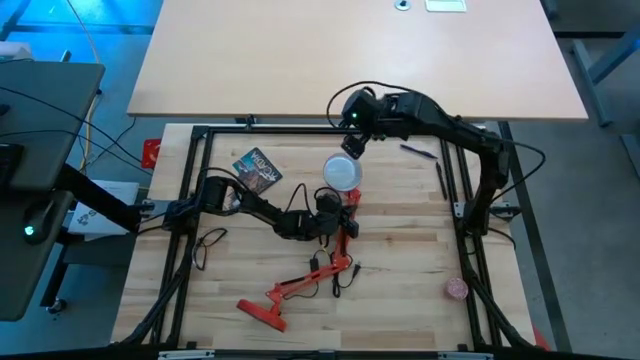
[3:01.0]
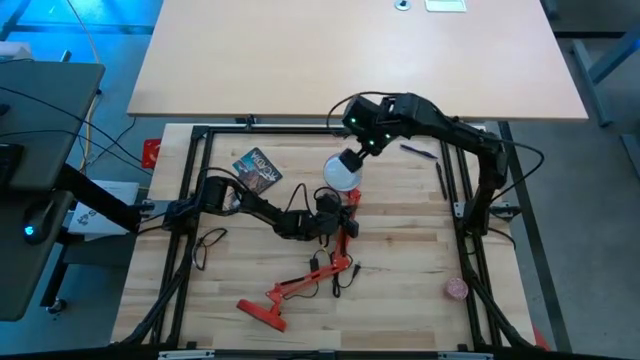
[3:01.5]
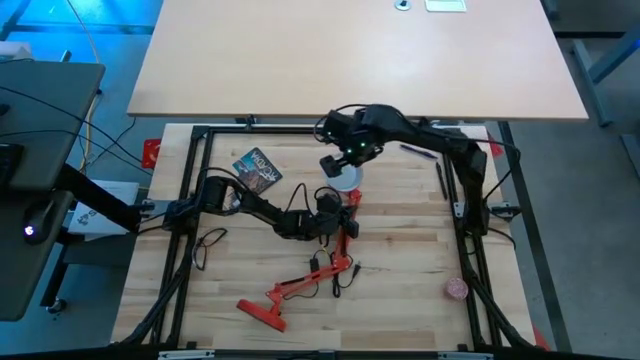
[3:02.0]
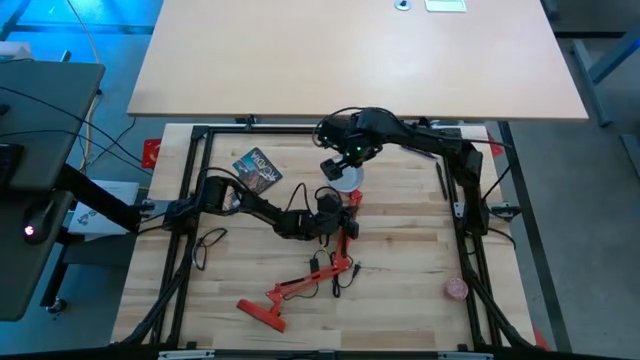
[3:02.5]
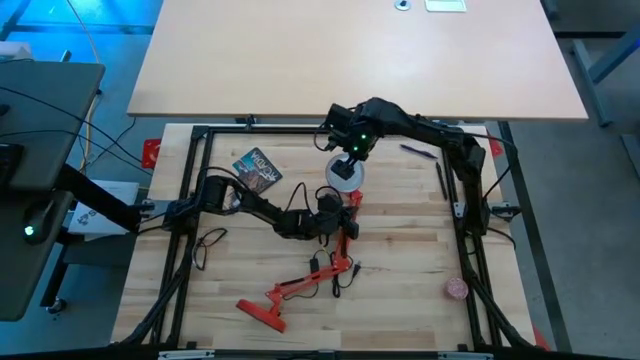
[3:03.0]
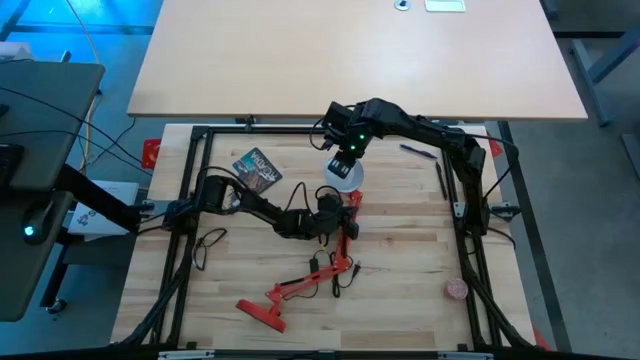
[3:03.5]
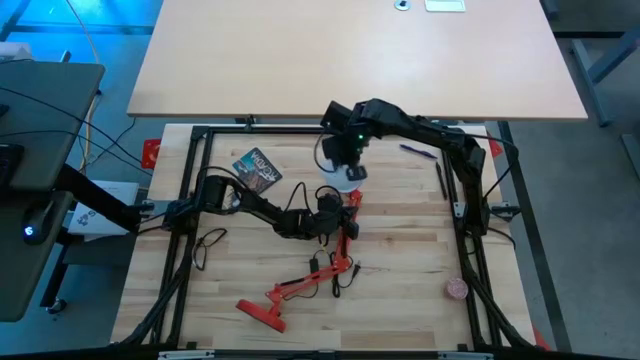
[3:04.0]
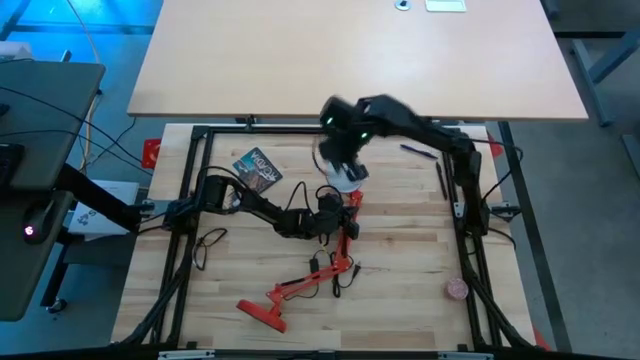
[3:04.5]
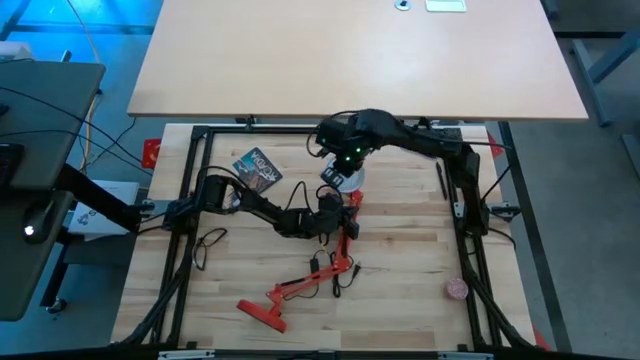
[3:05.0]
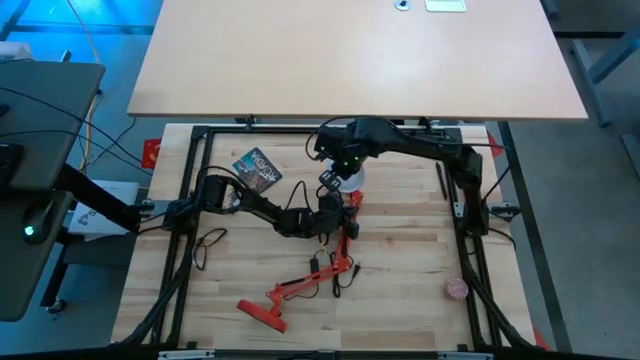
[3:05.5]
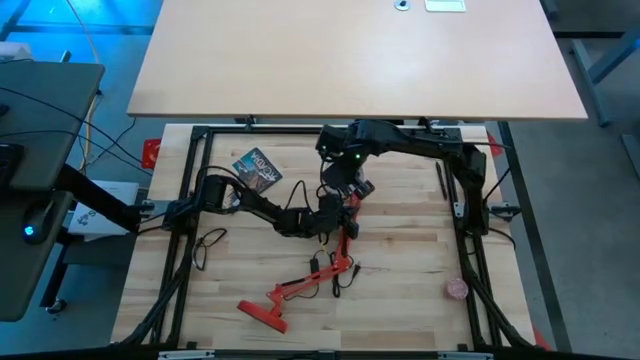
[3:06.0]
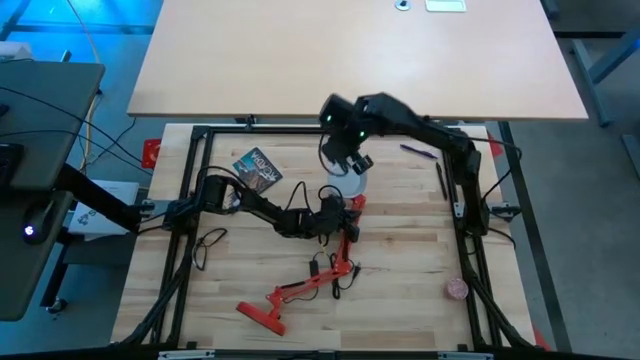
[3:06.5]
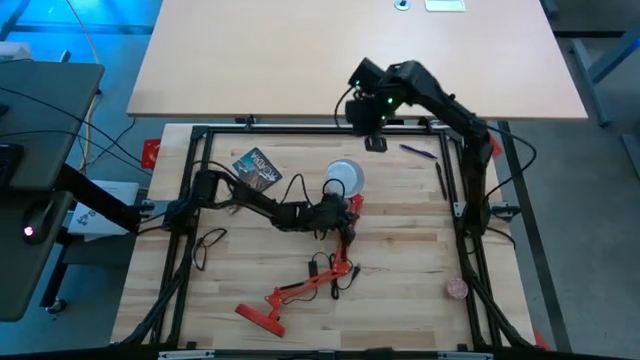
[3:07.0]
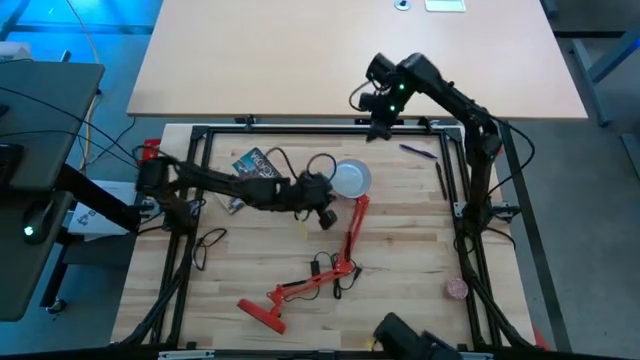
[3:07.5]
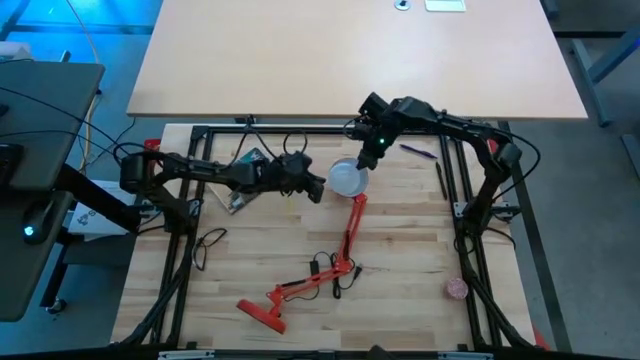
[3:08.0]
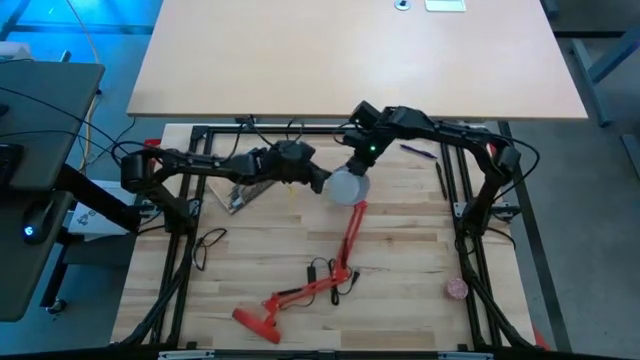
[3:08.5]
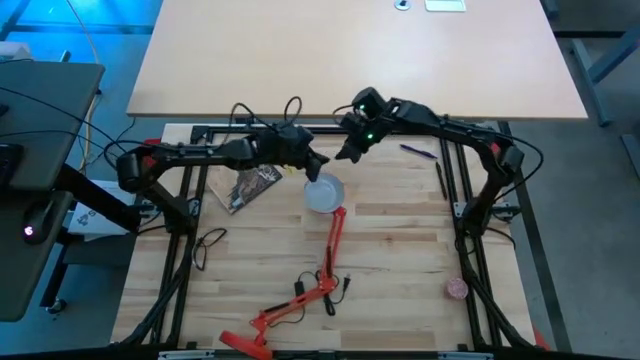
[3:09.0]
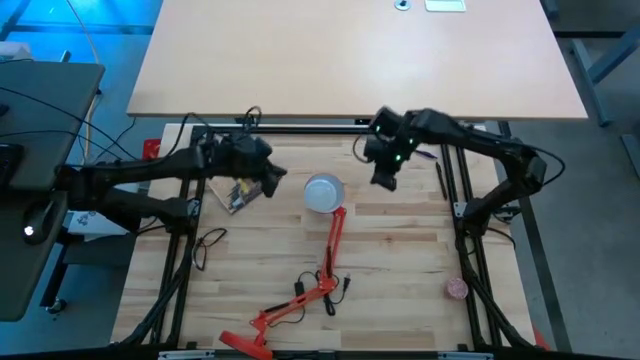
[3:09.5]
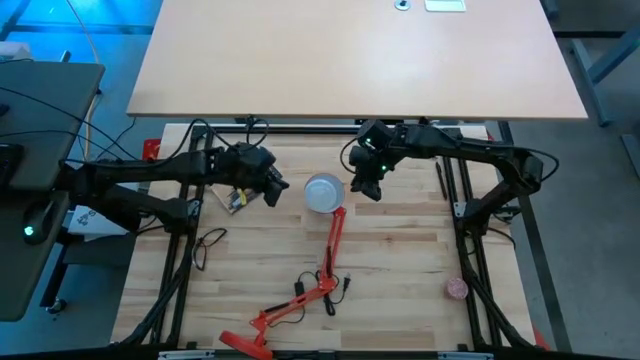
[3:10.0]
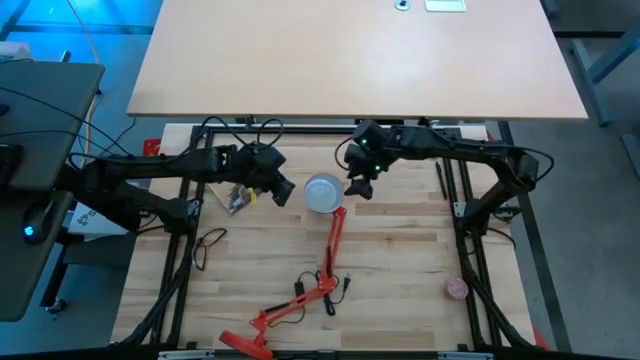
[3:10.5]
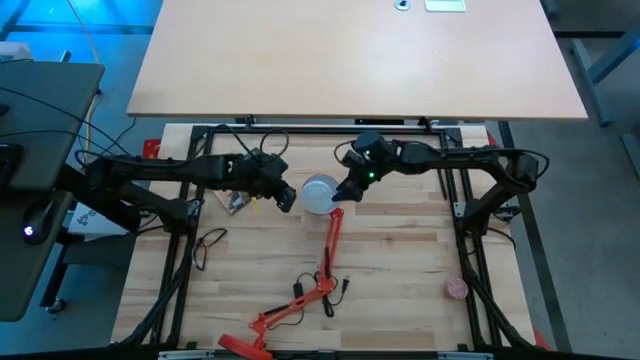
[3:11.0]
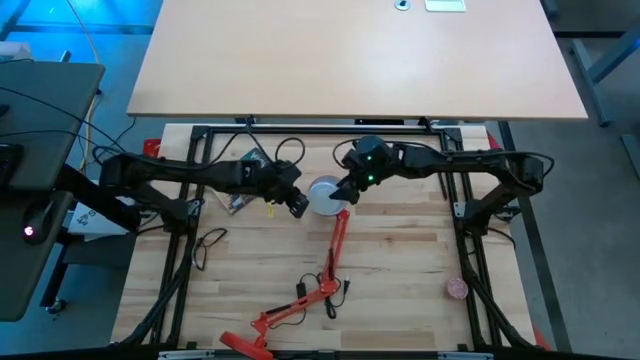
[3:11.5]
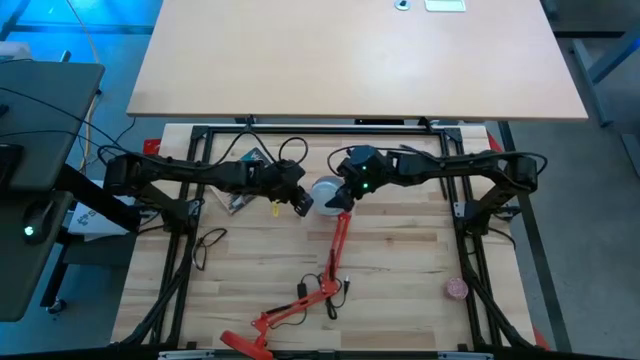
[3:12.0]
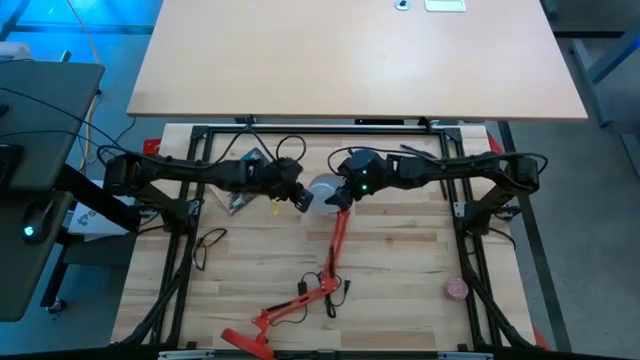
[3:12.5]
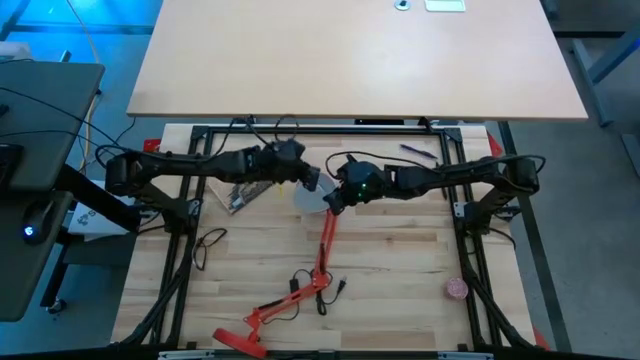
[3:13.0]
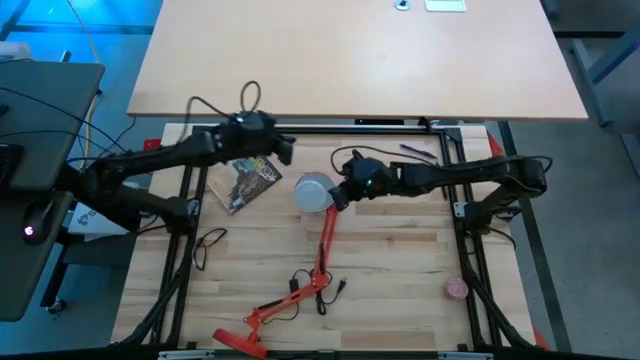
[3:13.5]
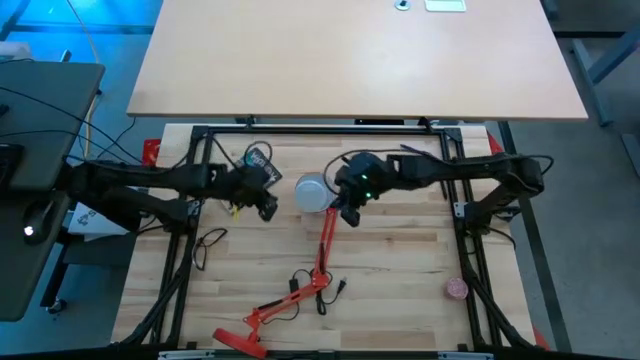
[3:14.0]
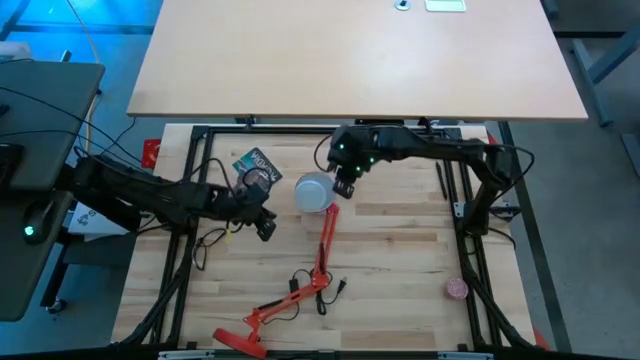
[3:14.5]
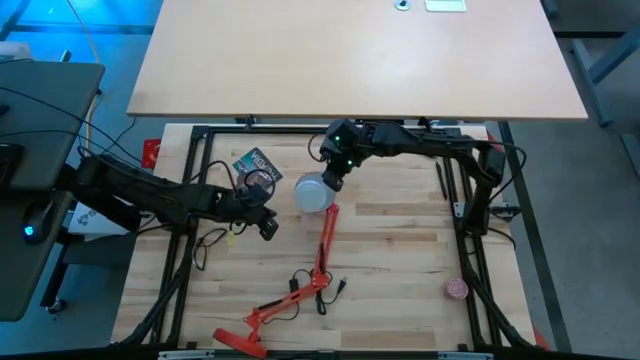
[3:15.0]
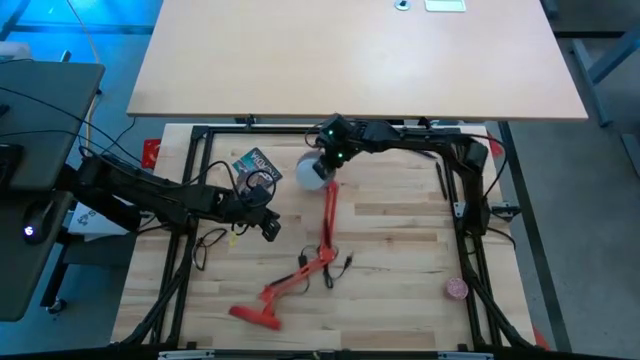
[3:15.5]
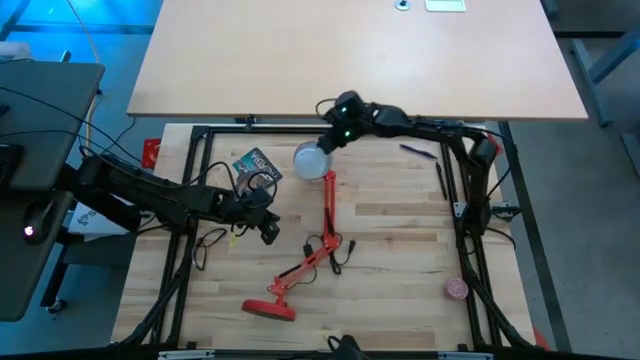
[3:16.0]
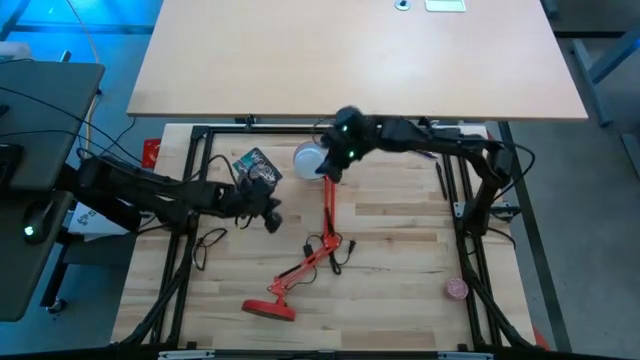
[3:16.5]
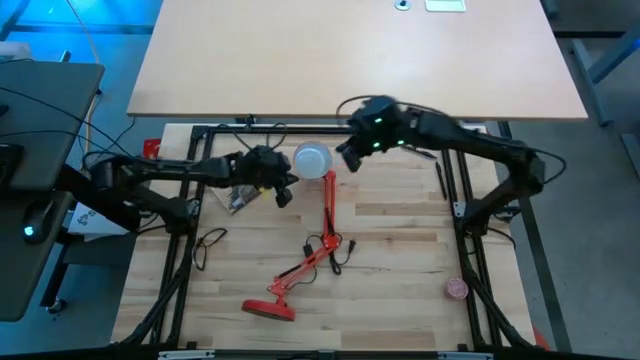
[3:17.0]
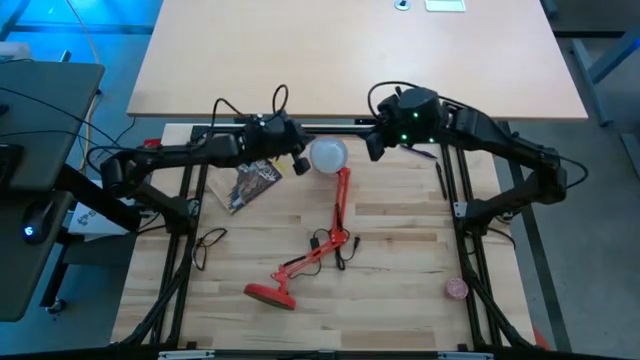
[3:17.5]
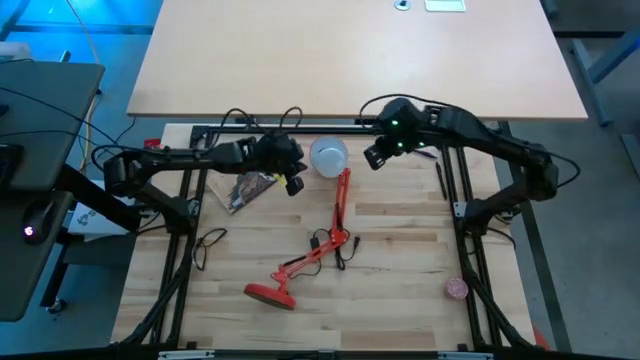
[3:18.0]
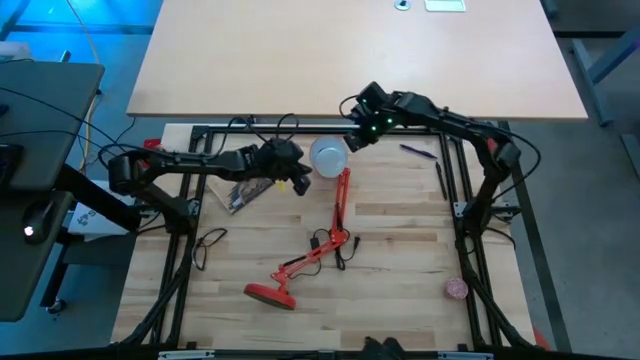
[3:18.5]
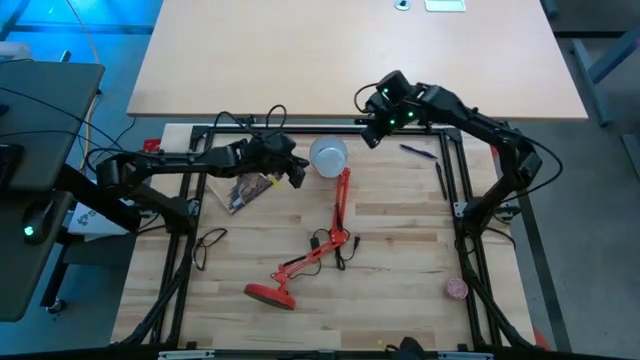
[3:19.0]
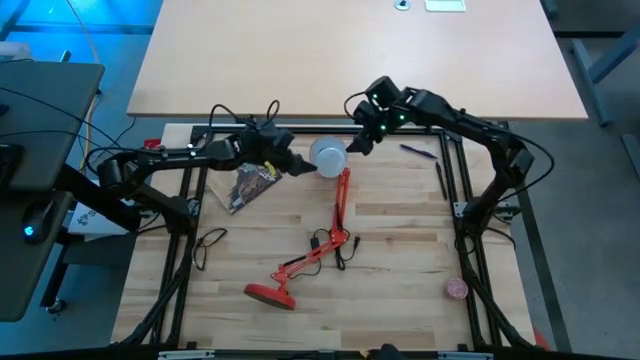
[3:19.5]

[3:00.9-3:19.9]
Task: Screw lightbulb
Remove the lightbulb from the red lamp

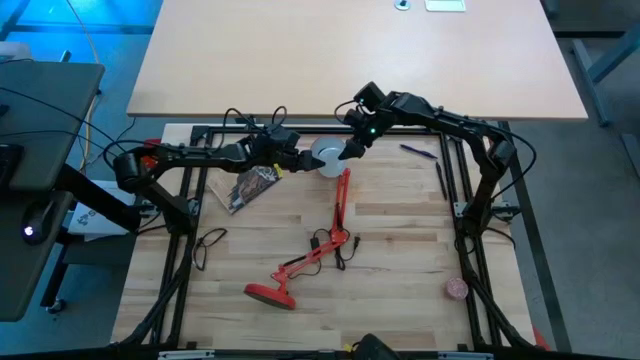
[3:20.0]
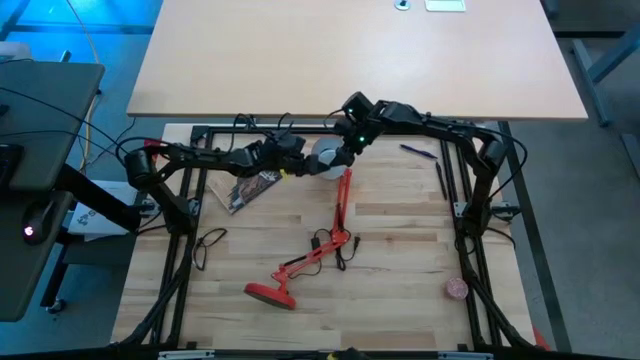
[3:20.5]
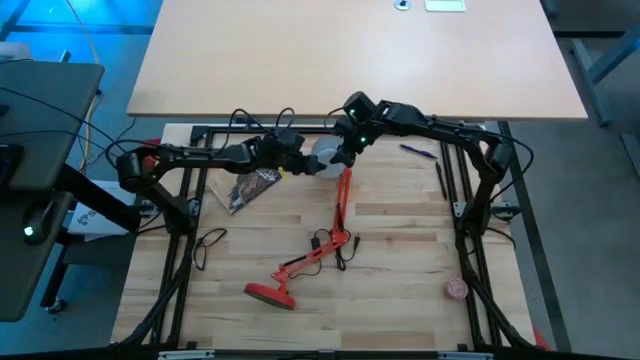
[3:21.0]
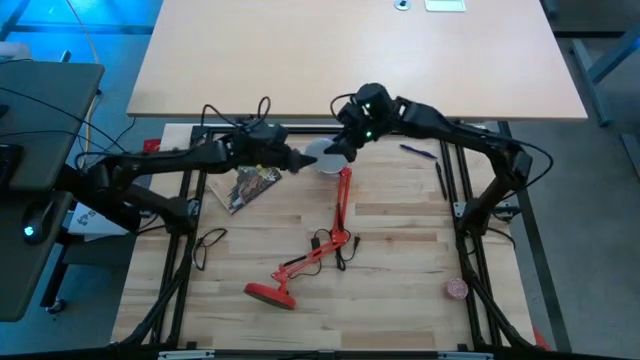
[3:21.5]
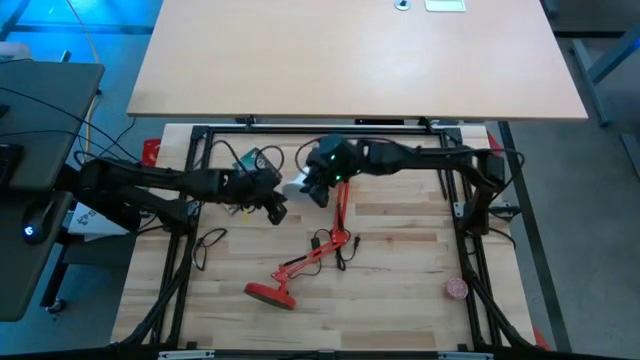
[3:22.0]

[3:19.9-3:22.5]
Remove the lightbulb from the red lamp

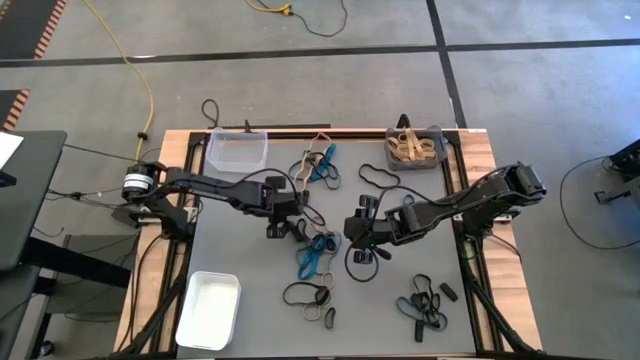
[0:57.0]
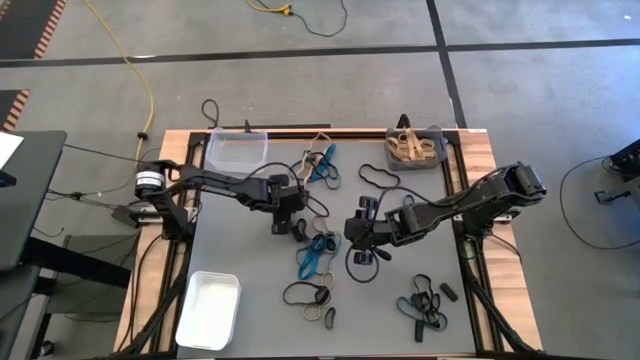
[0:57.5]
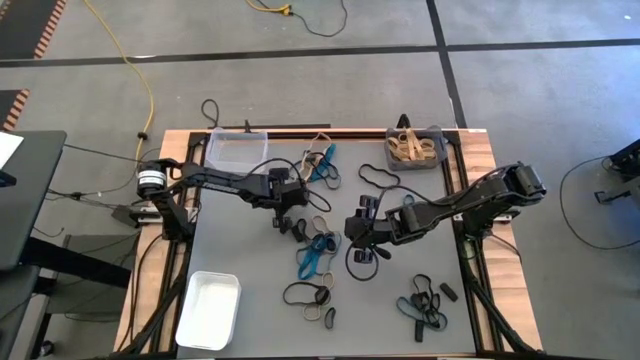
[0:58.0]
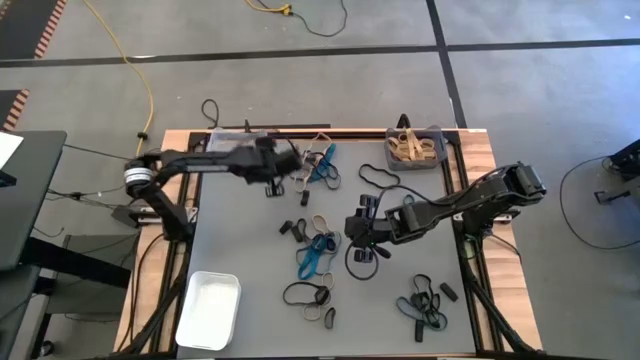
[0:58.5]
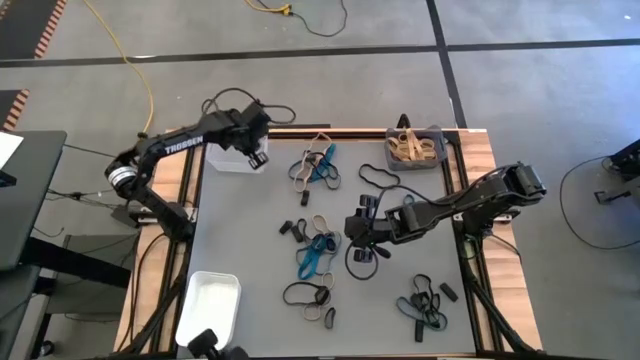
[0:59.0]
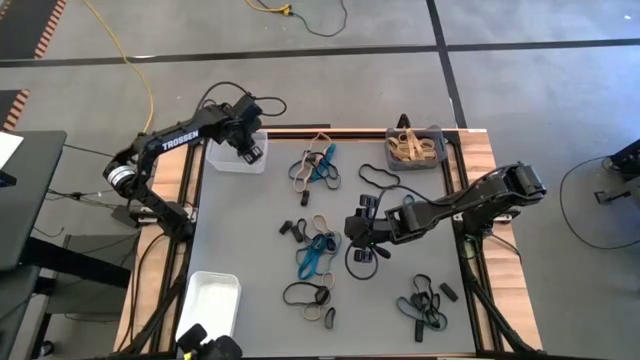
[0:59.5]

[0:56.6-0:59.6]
Task: Sort rubber bands into baskets
Put the black rubber band into the transparent bin
